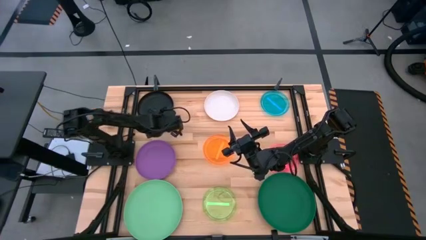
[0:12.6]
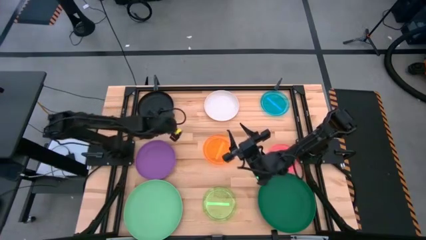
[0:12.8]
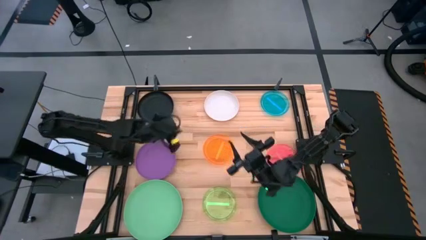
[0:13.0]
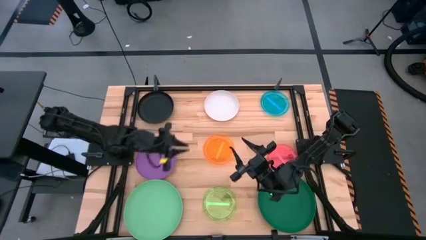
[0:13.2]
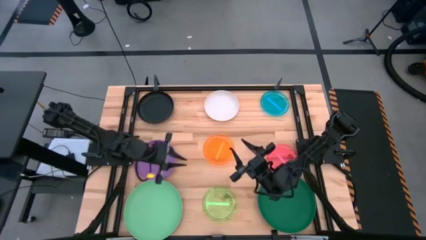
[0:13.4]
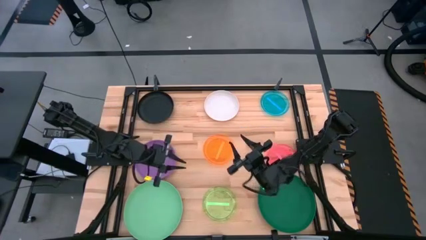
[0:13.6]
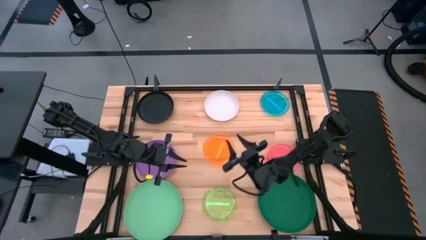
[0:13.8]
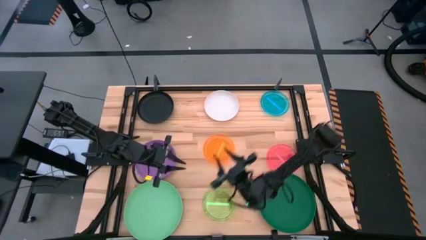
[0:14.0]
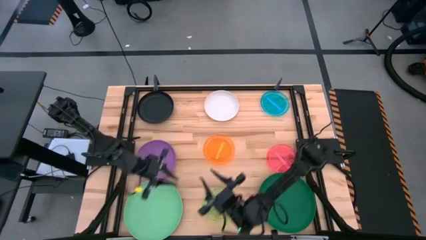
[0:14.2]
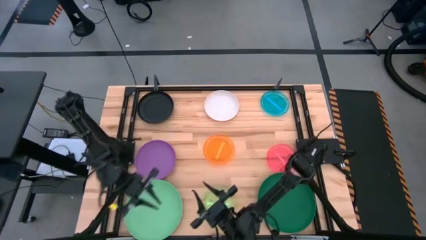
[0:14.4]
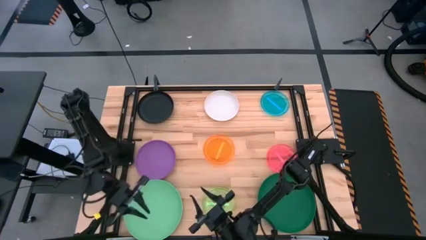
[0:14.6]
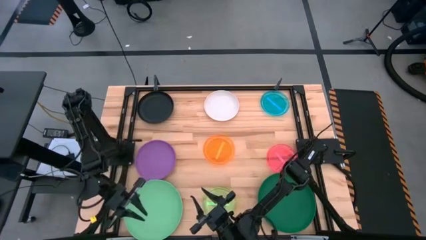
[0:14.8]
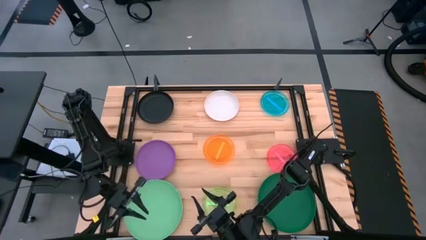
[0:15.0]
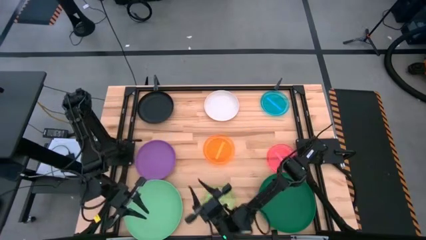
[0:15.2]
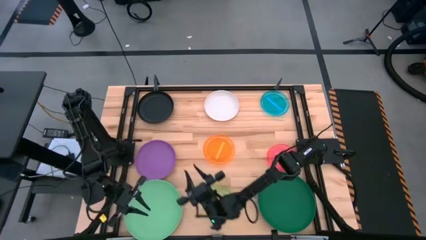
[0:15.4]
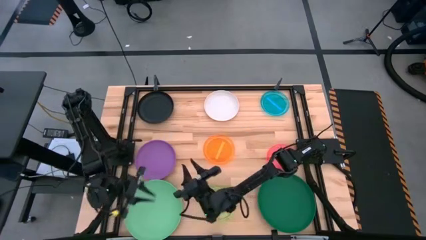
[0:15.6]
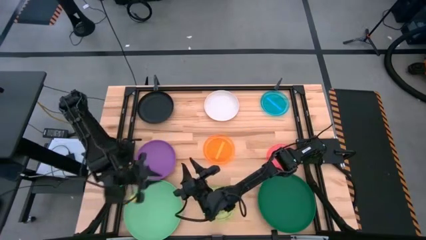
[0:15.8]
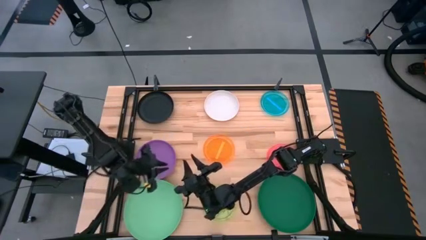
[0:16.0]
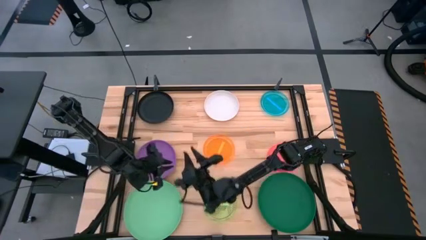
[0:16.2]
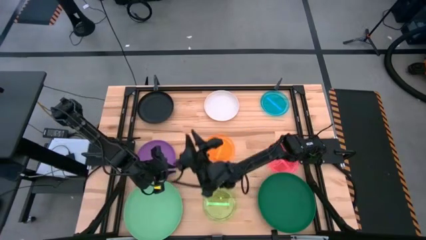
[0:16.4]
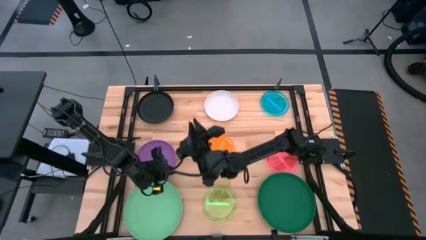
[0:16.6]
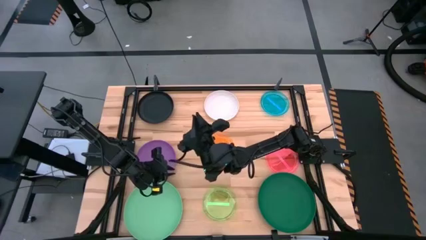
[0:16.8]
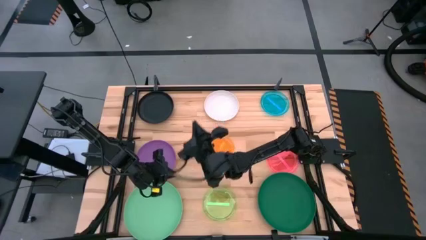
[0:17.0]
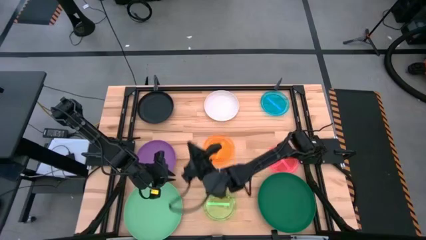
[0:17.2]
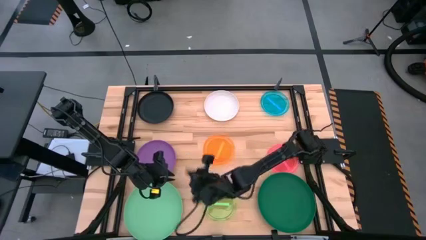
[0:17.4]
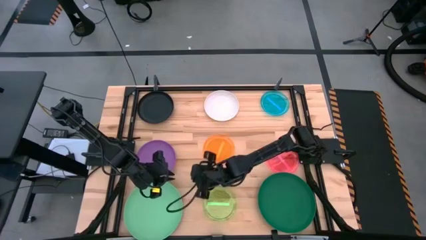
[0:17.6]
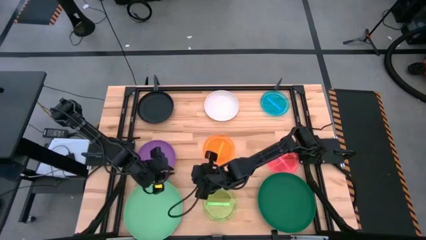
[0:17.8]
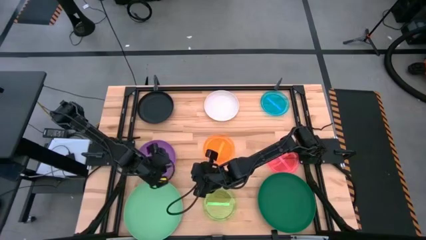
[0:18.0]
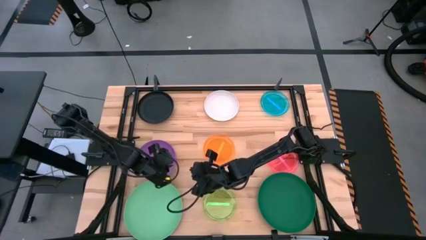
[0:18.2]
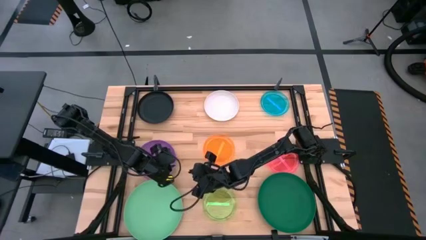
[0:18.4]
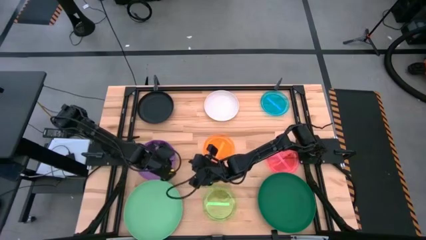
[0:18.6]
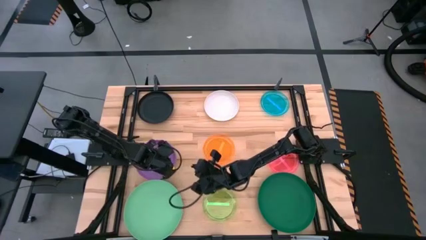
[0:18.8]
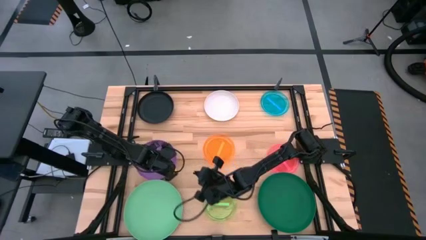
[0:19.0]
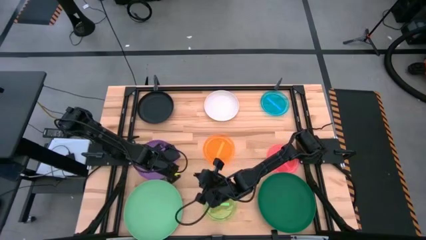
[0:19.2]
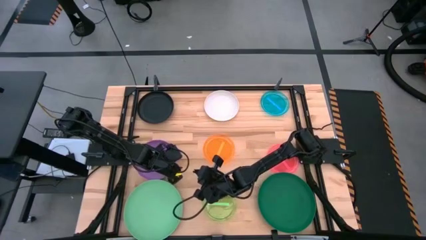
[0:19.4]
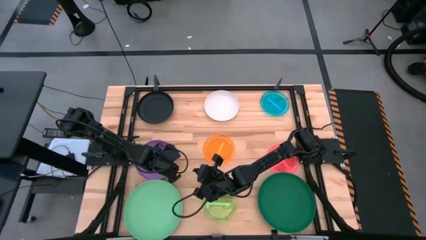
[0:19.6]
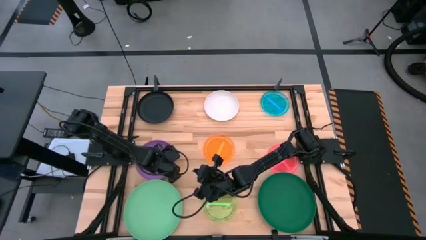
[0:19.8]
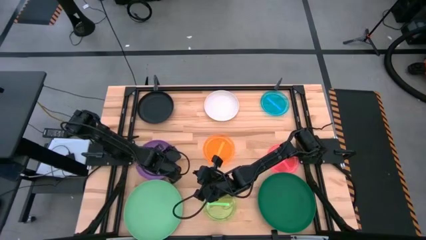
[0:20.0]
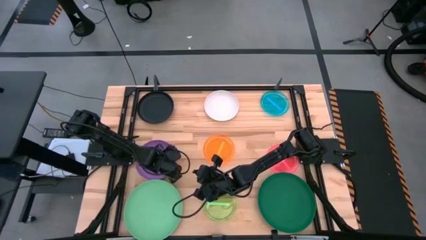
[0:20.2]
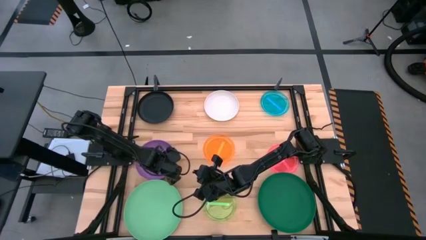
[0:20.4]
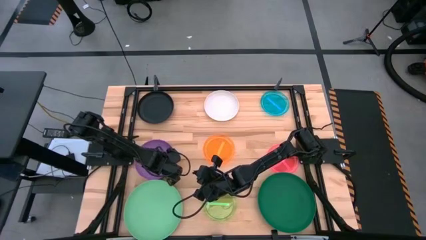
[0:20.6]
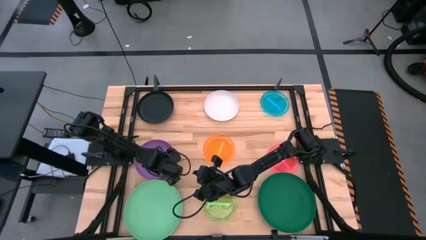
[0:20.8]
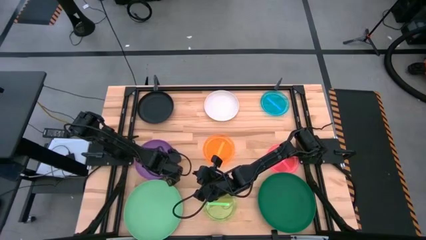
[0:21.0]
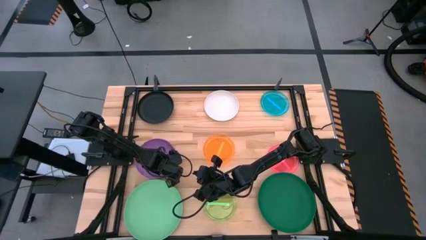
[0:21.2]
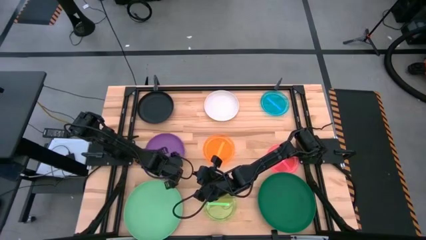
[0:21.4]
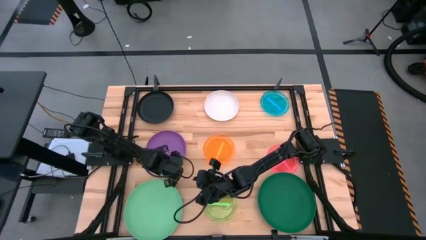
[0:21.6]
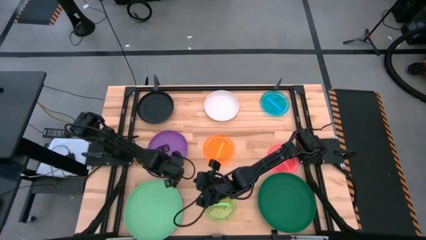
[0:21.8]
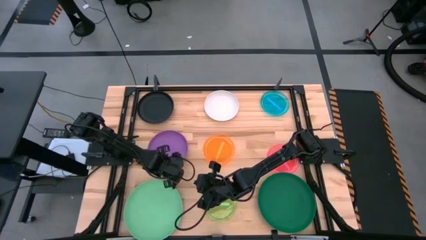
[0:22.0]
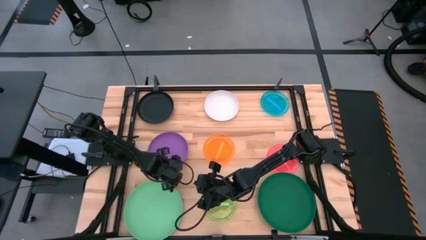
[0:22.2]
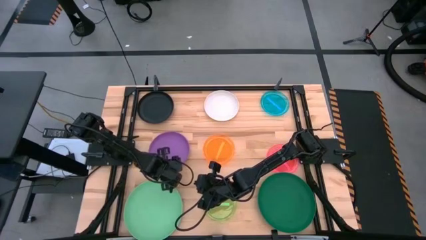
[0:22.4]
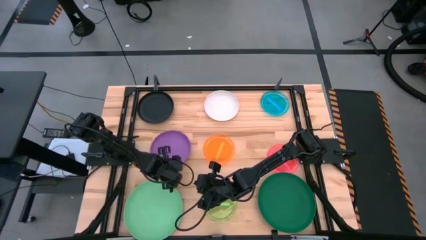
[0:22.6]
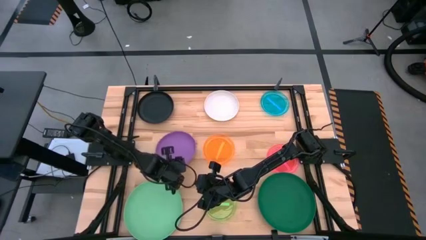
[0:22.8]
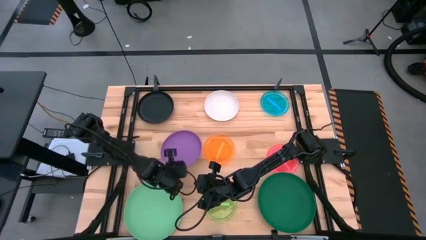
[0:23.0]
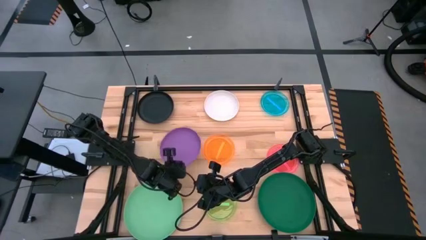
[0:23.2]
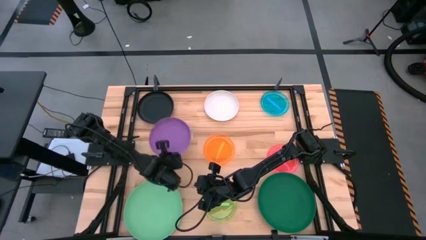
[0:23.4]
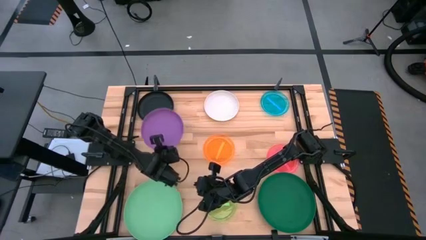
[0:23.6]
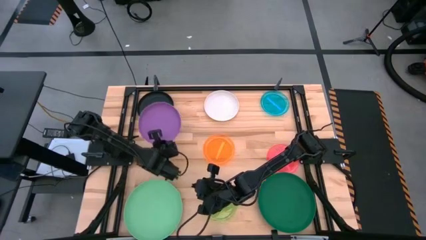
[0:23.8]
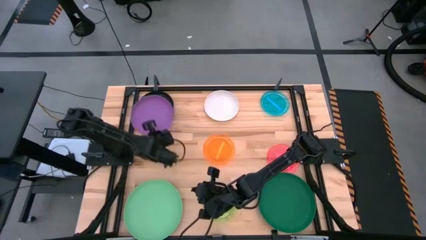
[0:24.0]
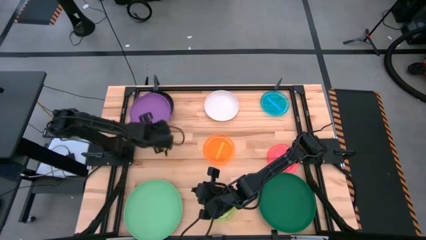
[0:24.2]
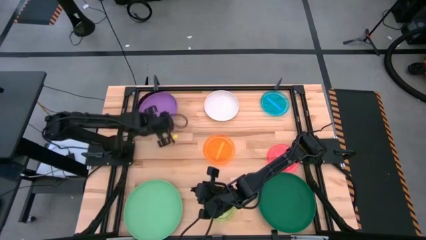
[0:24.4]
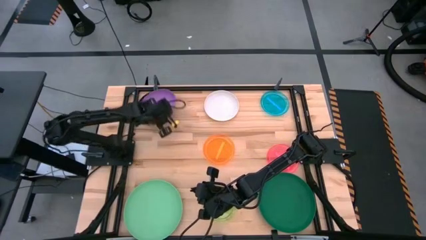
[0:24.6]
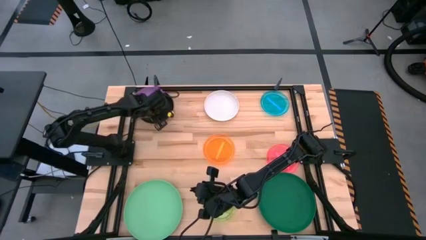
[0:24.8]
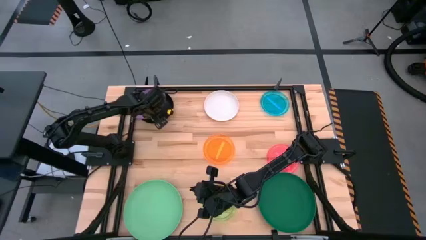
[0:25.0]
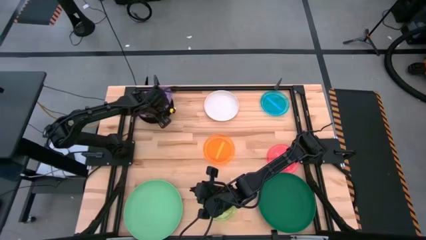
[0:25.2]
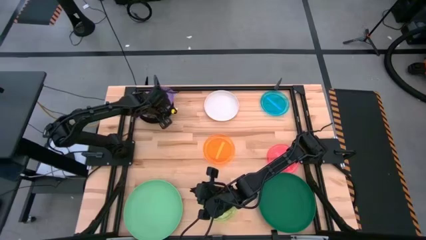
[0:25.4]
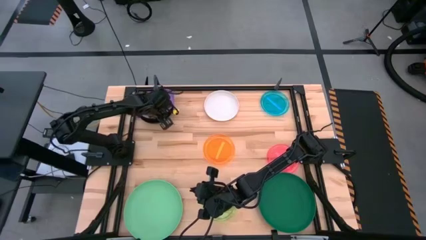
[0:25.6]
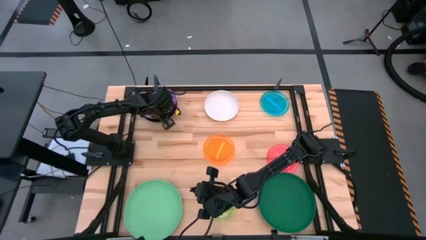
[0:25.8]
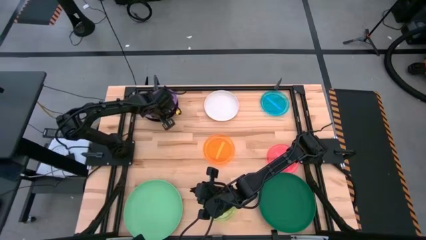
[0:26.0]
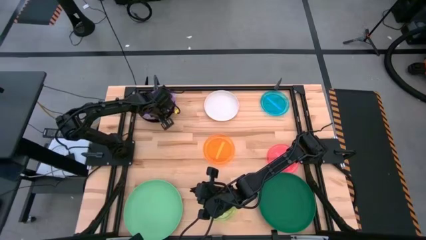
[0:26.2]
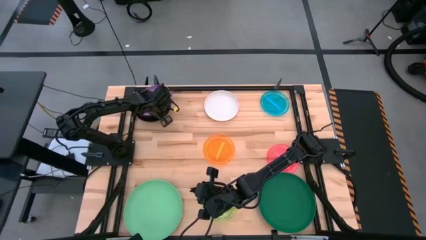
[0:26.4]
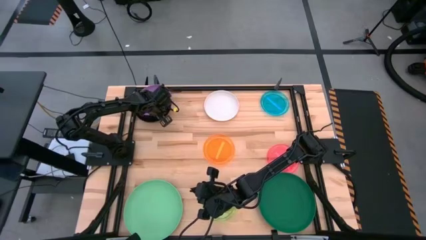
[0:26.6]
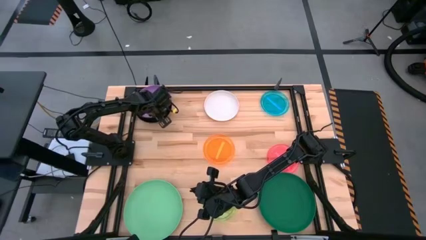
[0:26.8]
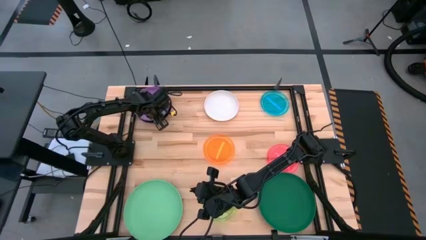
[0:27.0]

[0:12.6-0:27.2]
Task: Stack plastic plates
Stack the purple plate on top of the black plate
